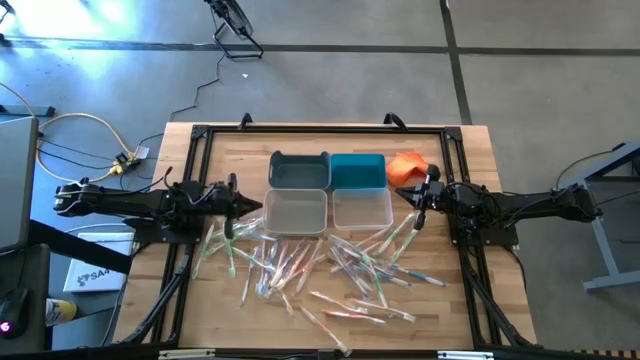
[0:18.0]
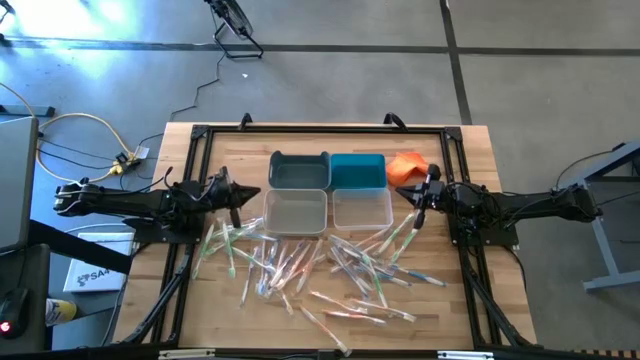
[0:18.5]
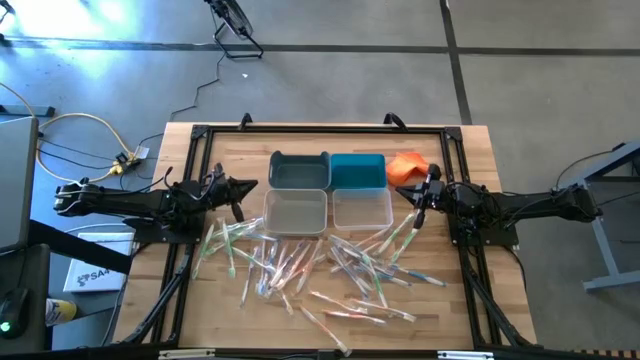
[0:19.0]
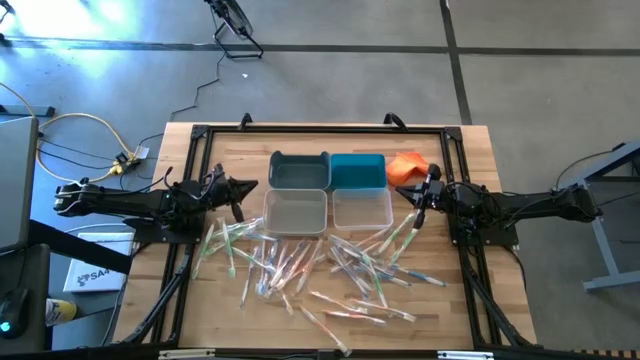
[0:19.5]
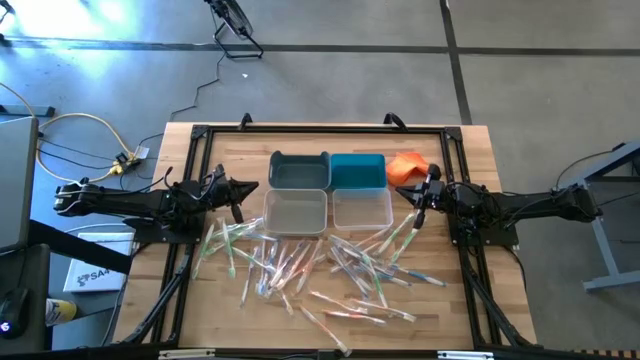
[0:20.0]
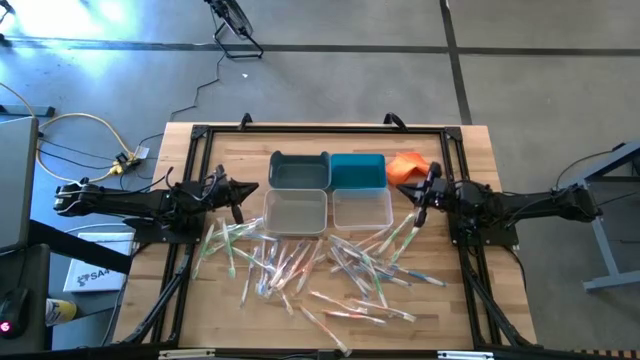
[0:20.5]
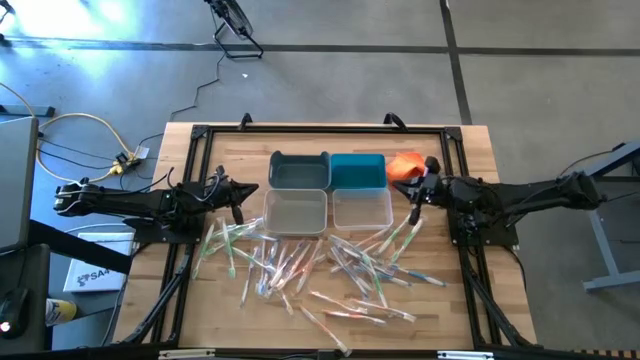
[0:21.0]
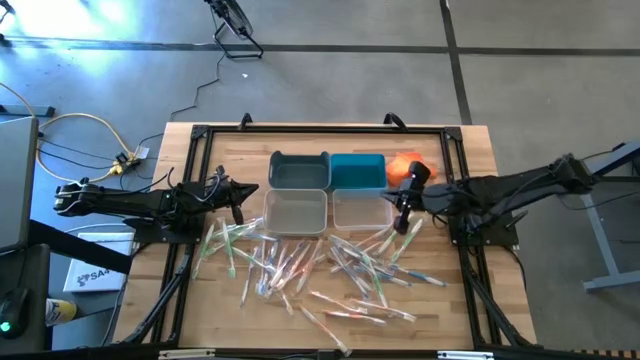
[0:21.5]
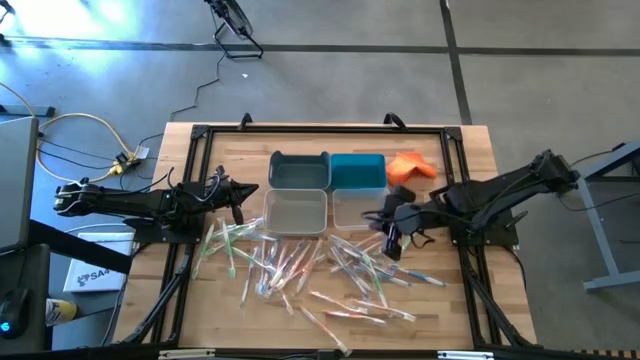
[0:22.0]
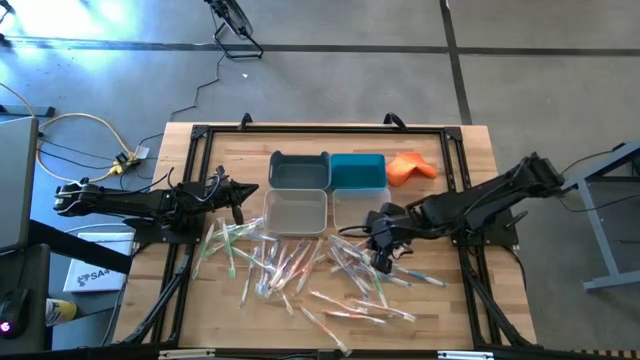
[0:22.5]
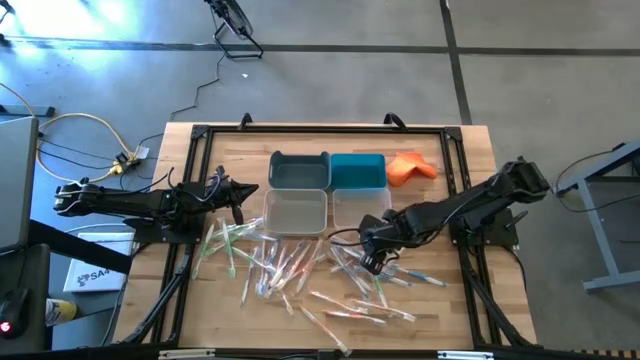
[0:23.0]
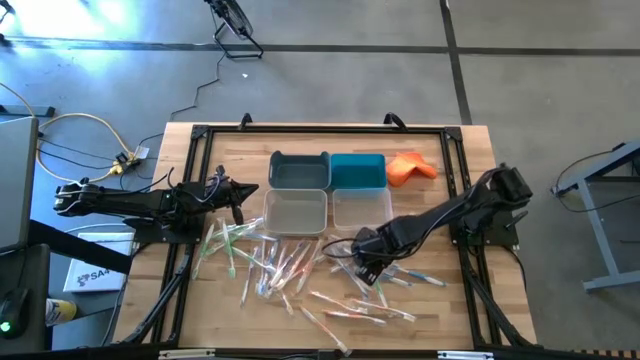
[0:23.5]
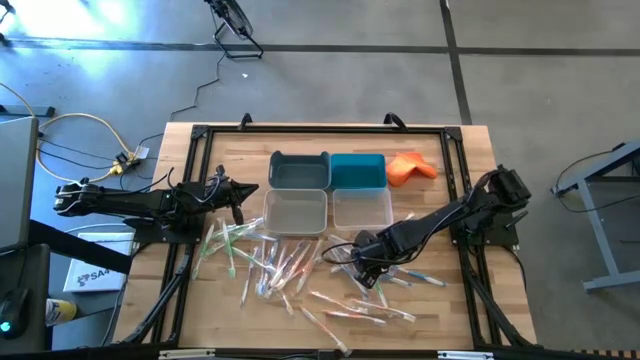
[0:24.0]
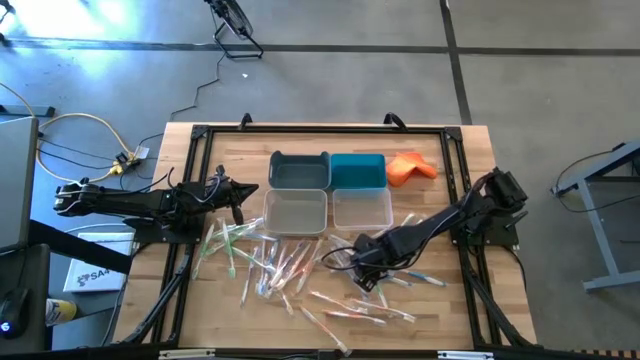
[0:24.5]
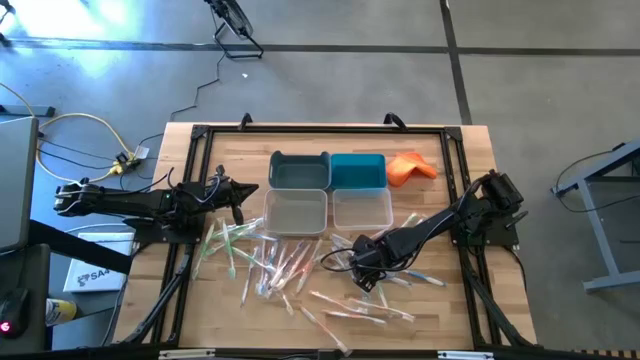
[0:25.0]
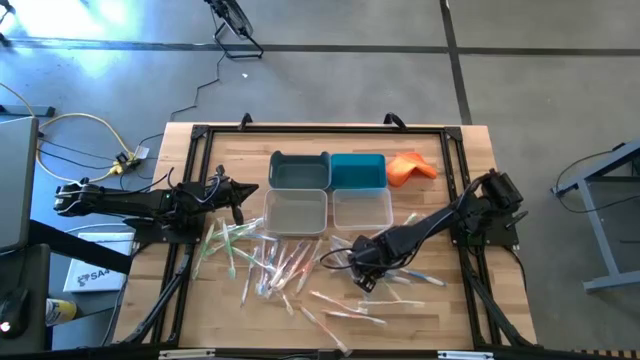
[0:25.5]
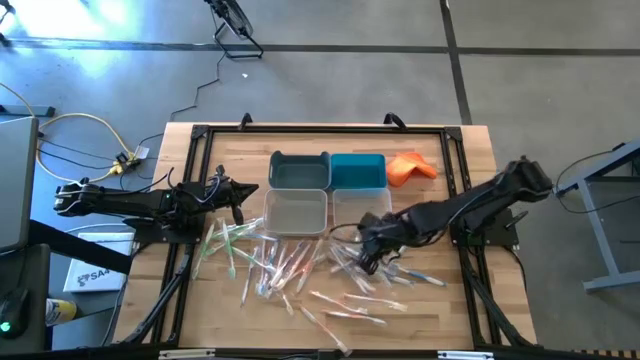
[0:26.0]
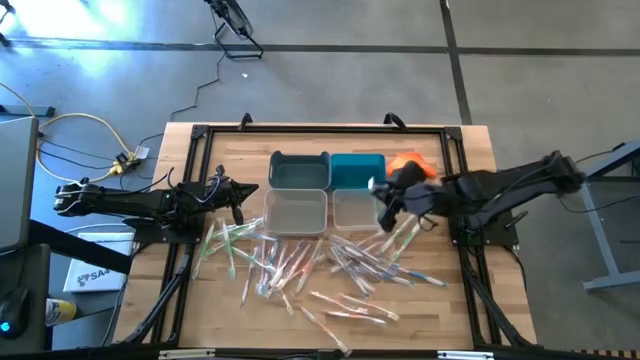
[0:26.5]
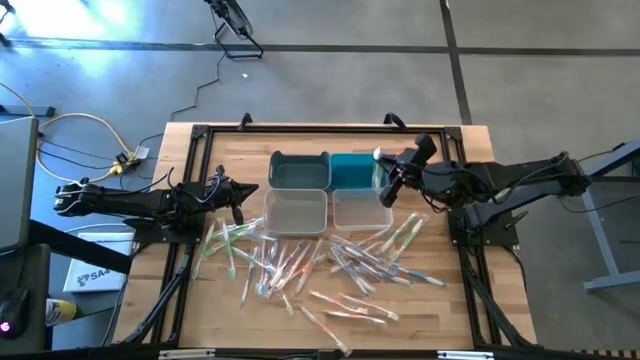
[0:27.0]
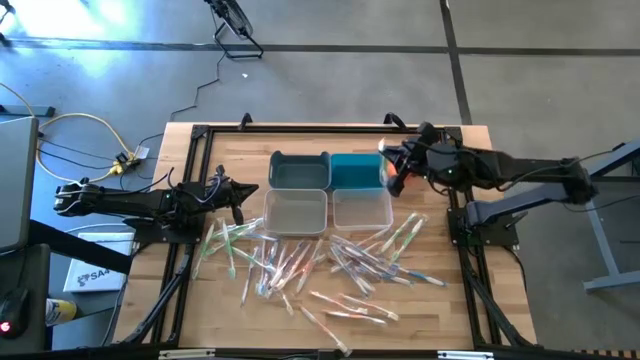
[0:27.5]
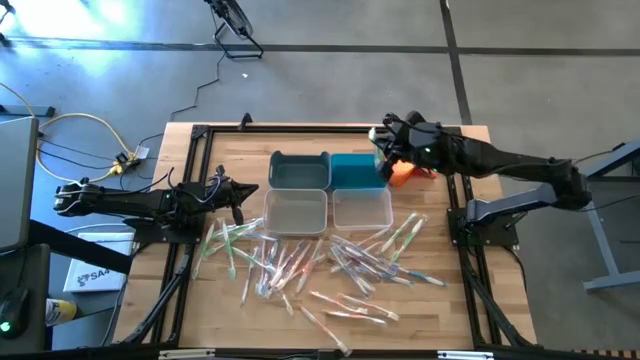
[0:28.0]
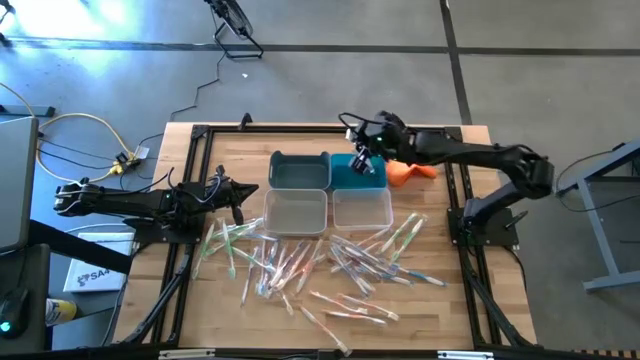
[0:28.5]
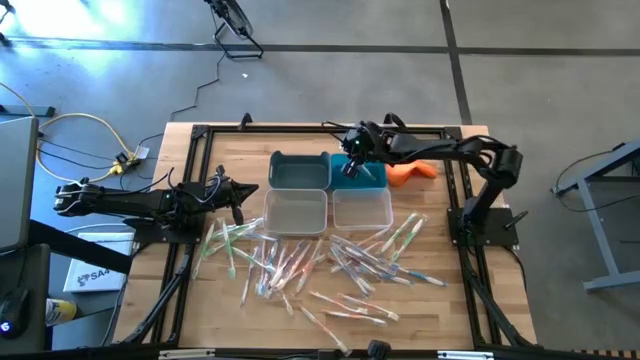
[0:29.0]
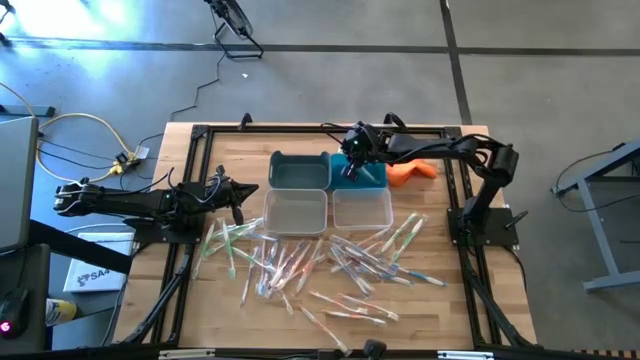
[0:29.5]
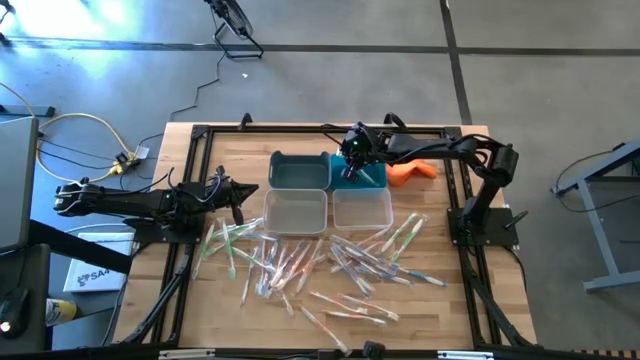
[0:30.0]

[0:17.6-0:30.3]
Task: Pick & Place Toothbrushes
Put the green toothbrush into the blue bin

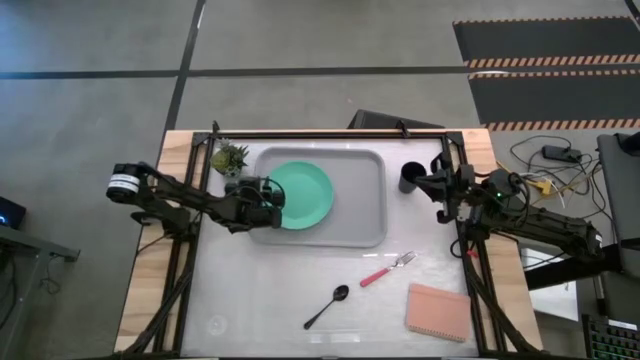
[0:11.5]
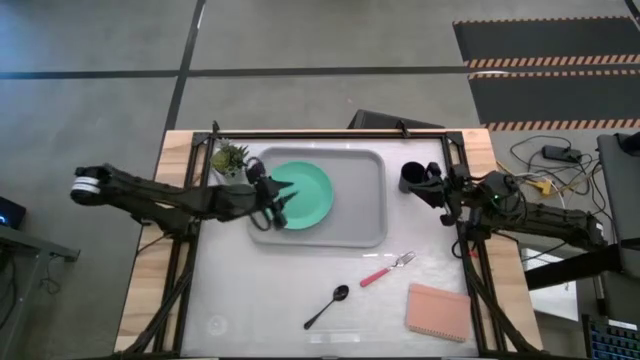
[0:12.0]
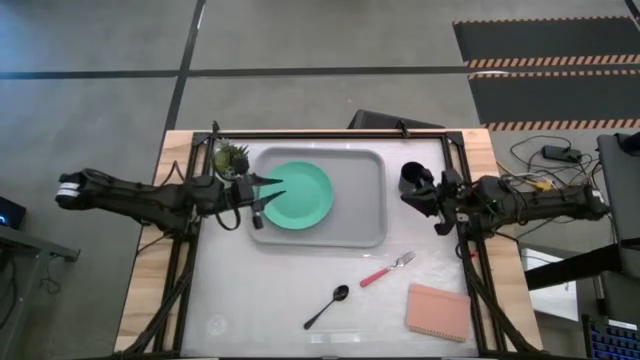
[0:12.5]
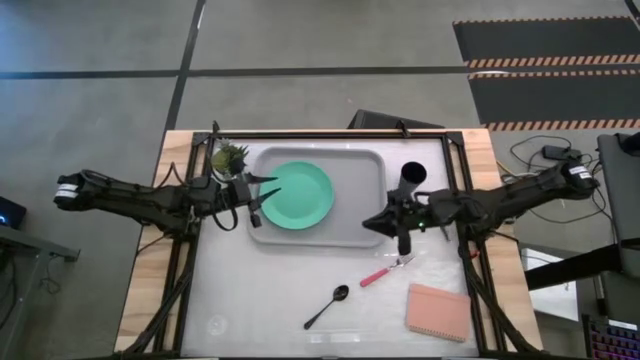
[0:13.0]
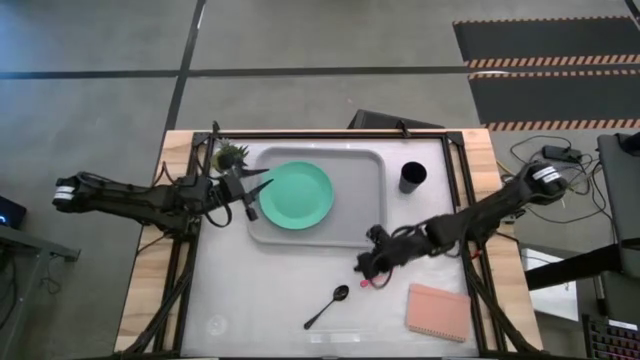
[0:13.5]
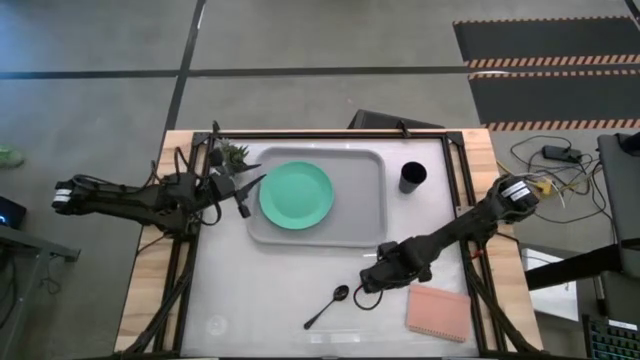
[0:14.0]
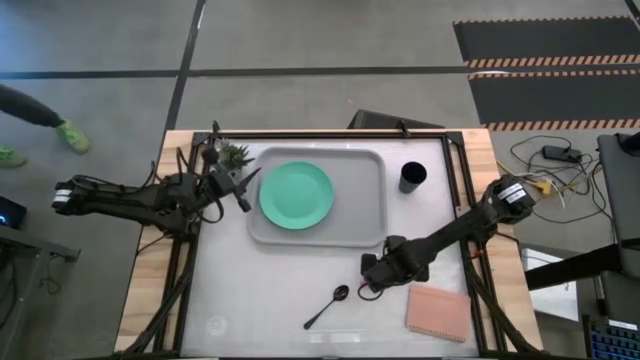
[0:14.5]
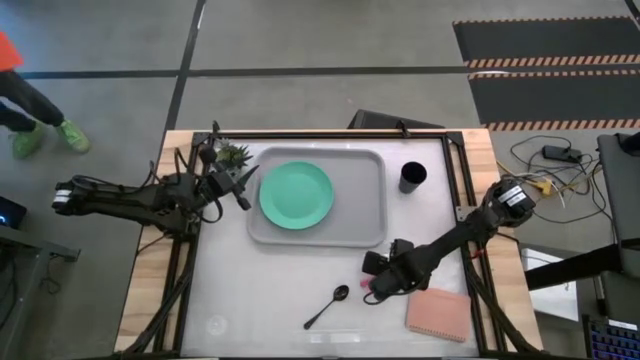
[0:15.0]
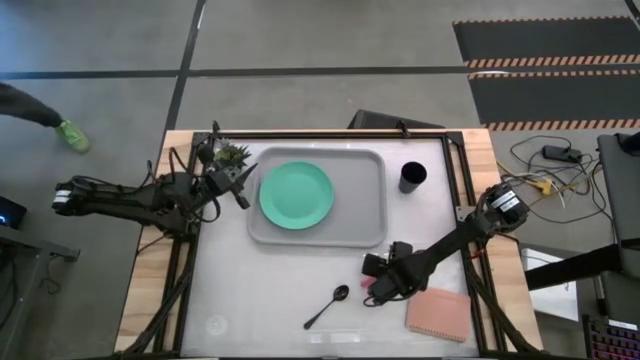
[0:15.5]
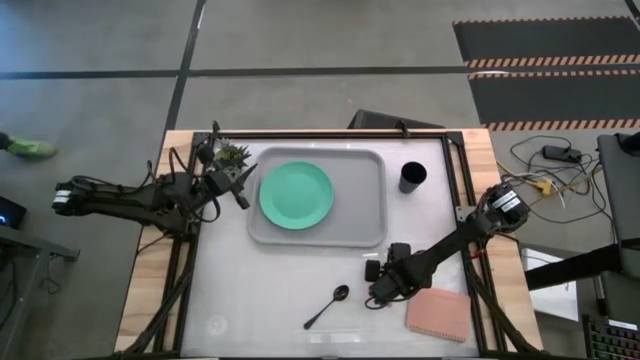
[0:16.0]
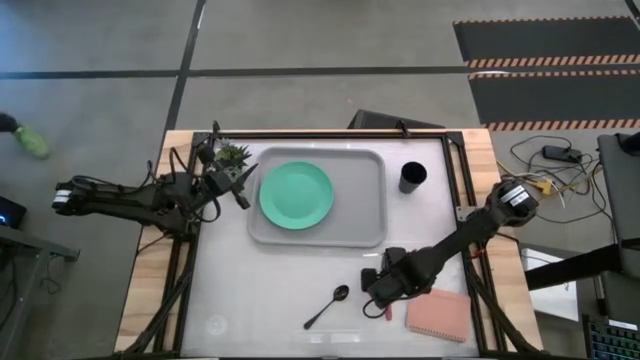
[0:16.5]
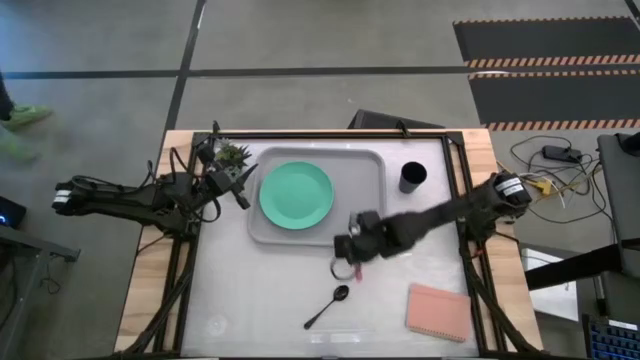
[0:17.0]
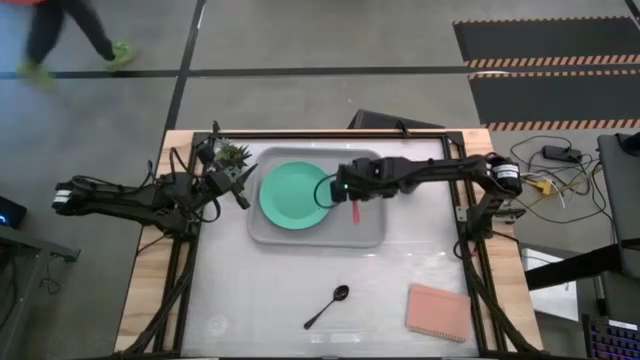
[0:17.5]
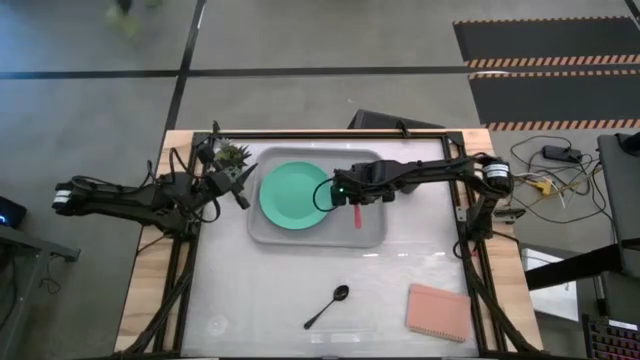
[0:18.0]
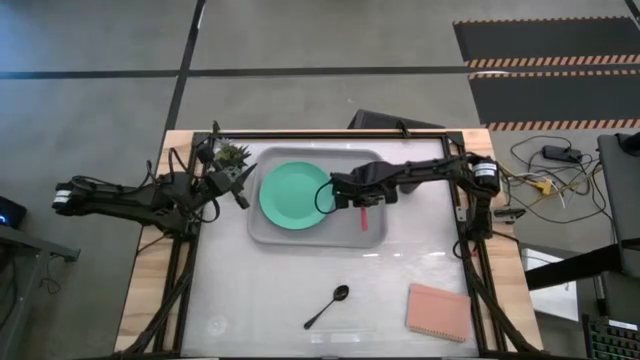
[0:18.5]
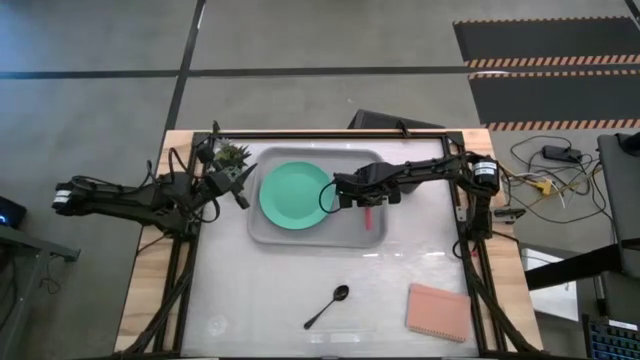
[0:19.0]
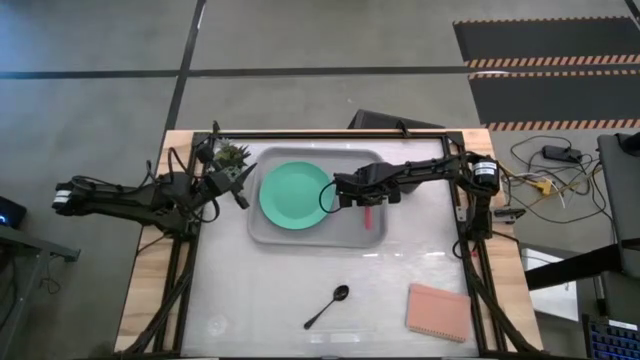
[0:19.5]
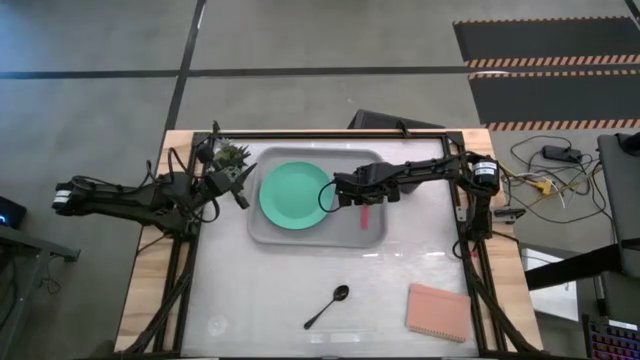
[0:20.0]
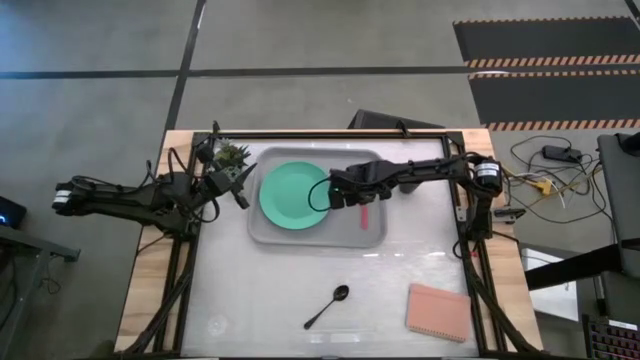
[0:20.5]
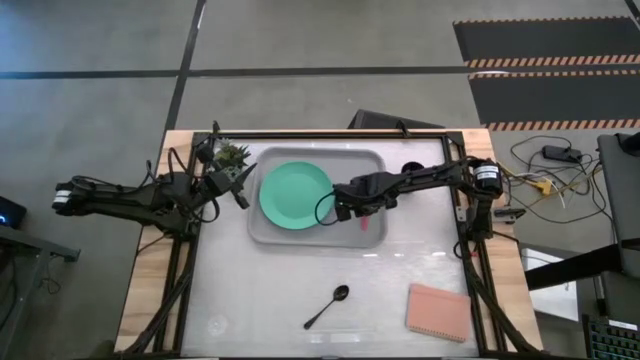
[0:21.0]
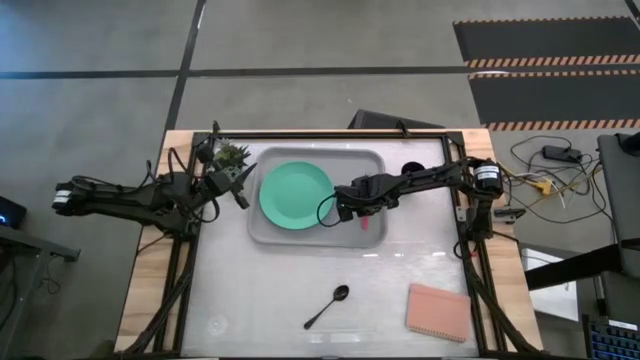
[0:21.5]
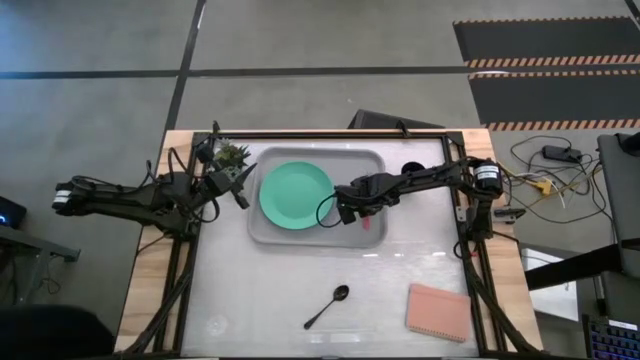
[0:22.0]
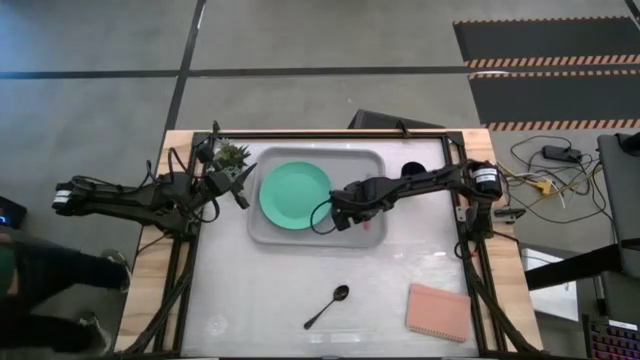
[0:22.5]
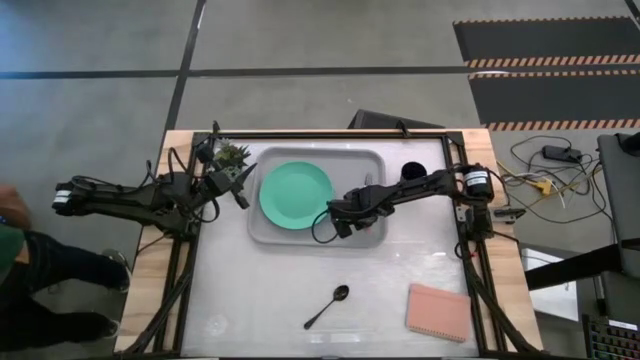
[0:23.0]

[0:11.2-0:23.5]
Task: Pick and place plate/cup/fork/spoon on tray
Put the pink fork on the gray tray to the right side of the light green plate
